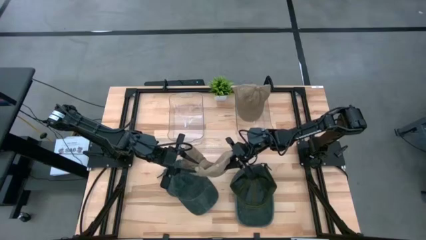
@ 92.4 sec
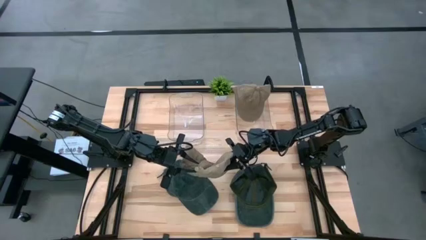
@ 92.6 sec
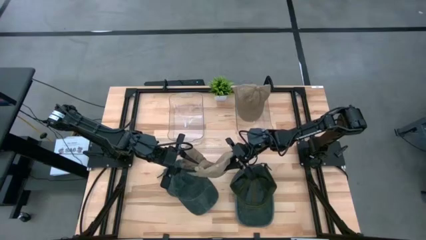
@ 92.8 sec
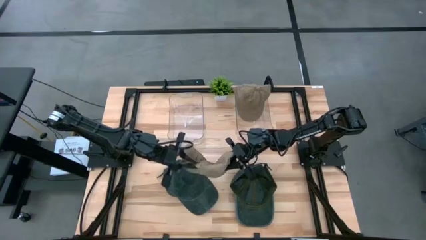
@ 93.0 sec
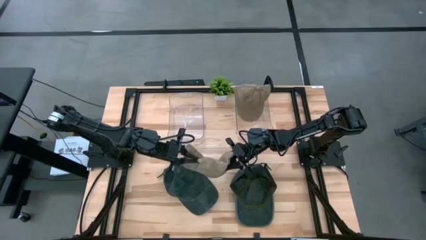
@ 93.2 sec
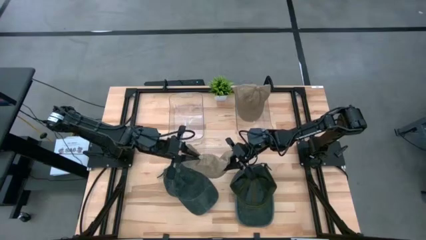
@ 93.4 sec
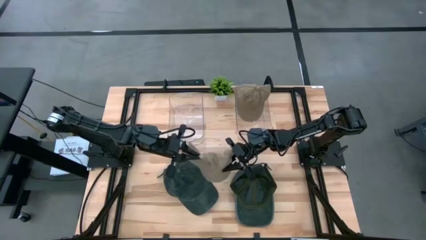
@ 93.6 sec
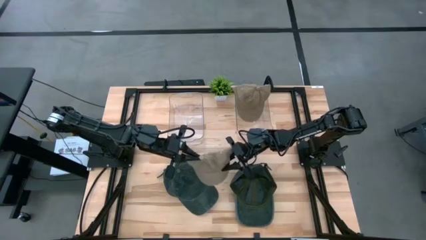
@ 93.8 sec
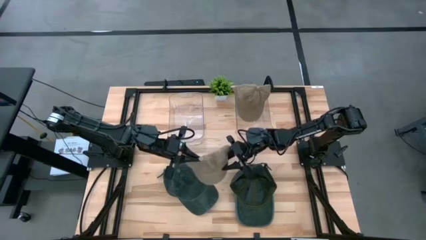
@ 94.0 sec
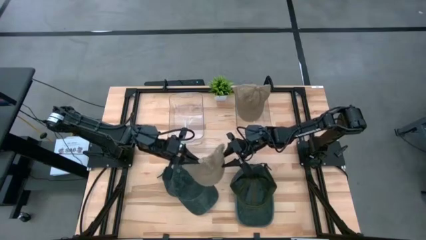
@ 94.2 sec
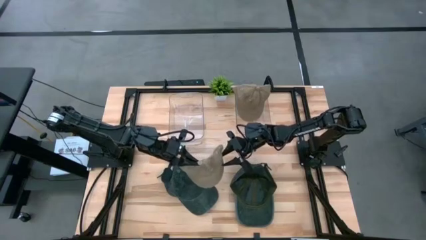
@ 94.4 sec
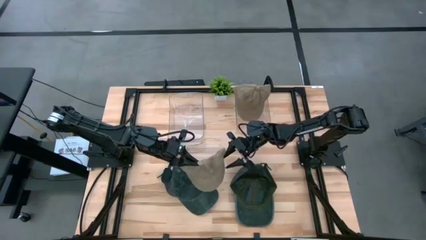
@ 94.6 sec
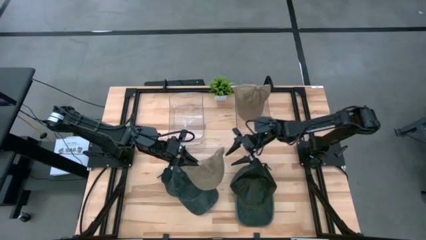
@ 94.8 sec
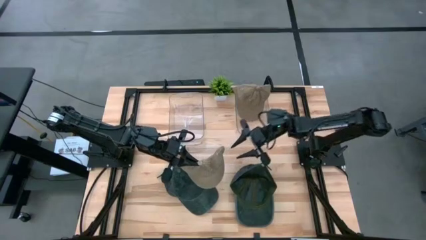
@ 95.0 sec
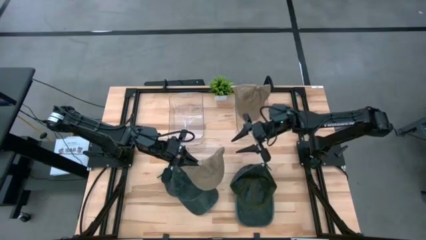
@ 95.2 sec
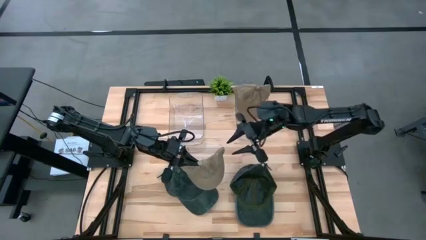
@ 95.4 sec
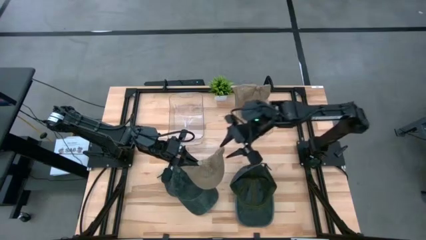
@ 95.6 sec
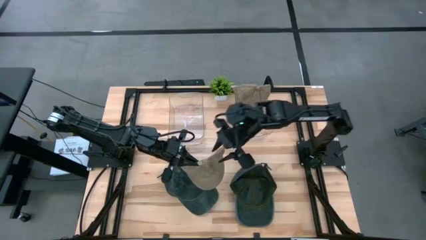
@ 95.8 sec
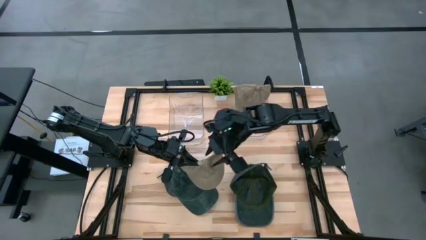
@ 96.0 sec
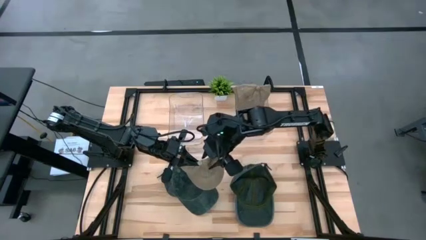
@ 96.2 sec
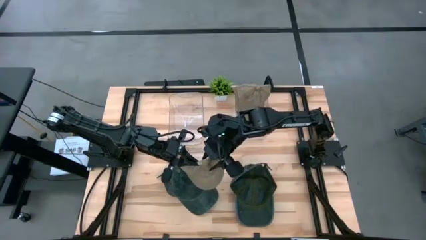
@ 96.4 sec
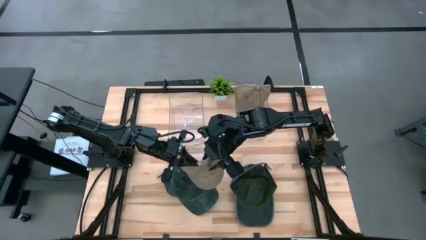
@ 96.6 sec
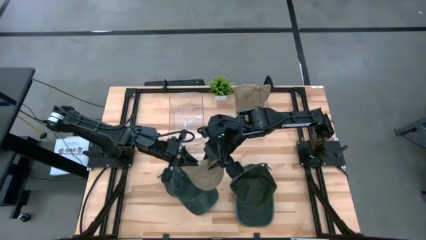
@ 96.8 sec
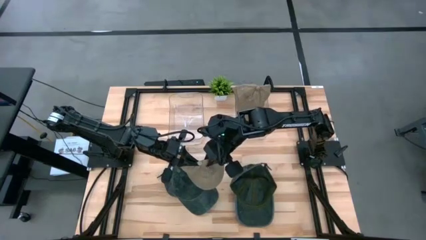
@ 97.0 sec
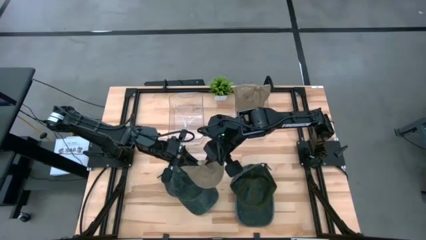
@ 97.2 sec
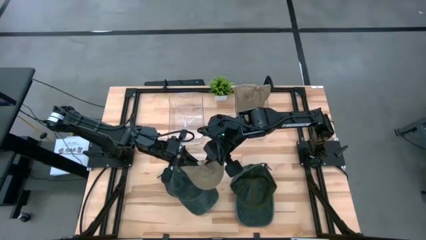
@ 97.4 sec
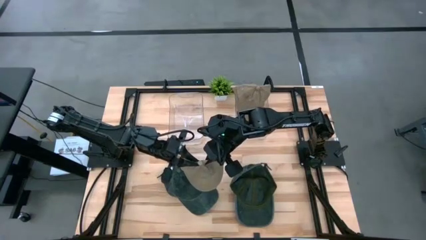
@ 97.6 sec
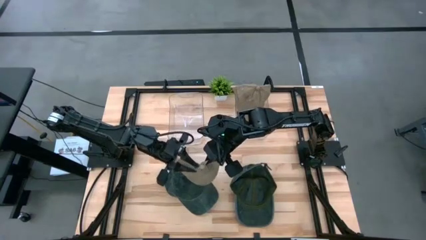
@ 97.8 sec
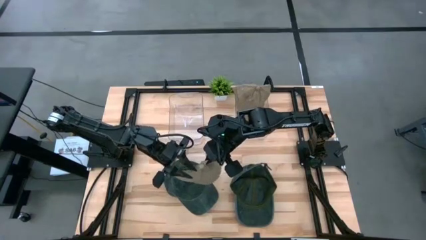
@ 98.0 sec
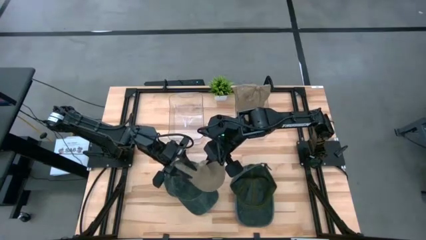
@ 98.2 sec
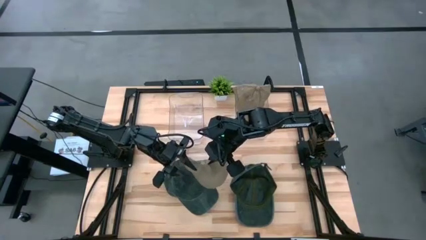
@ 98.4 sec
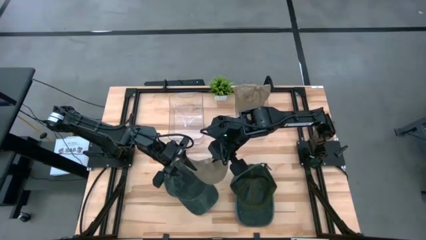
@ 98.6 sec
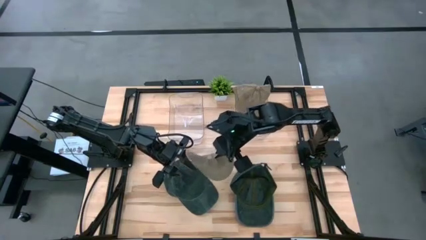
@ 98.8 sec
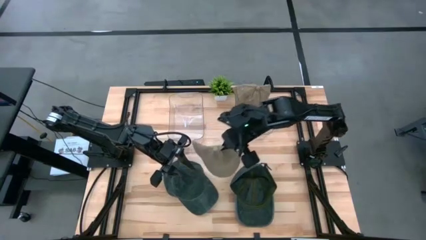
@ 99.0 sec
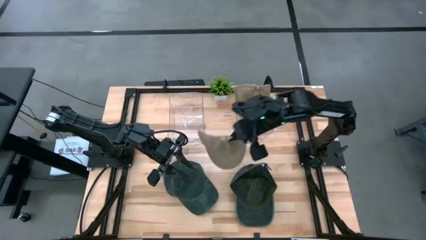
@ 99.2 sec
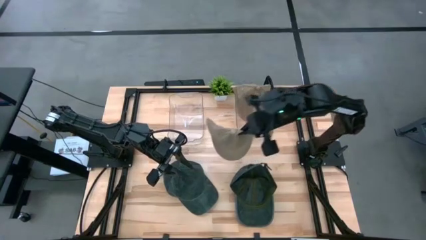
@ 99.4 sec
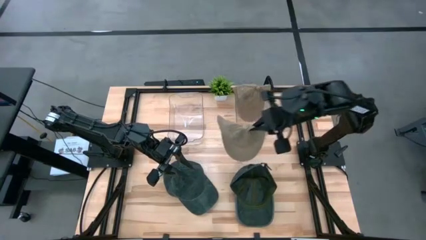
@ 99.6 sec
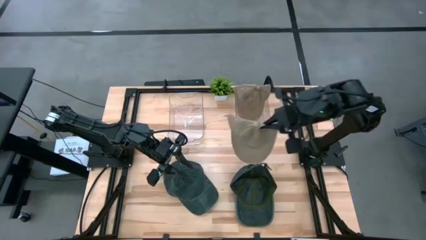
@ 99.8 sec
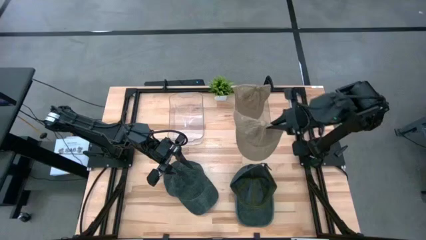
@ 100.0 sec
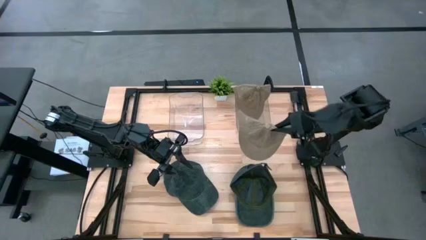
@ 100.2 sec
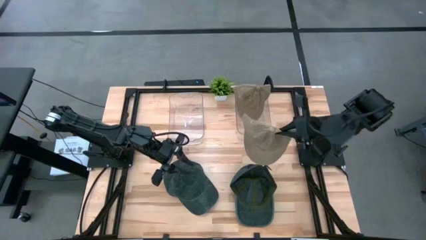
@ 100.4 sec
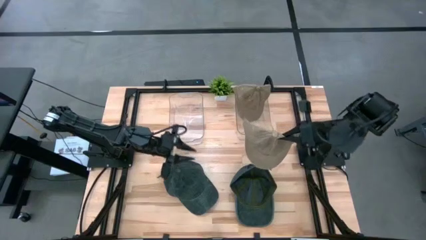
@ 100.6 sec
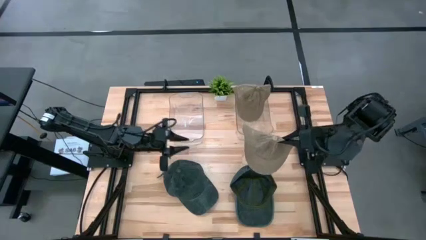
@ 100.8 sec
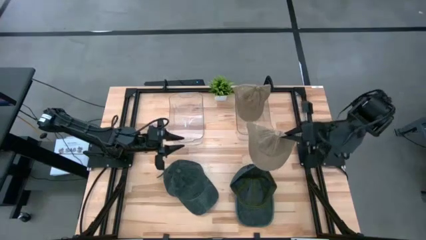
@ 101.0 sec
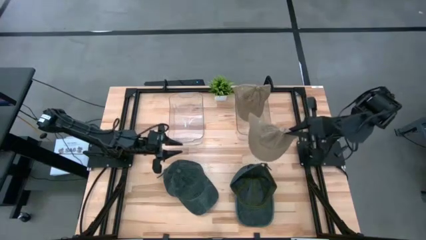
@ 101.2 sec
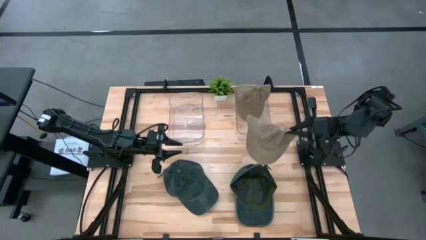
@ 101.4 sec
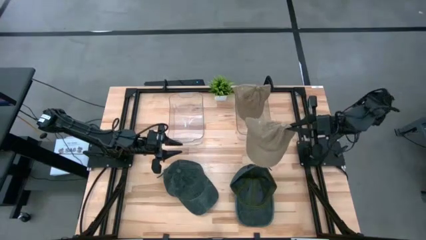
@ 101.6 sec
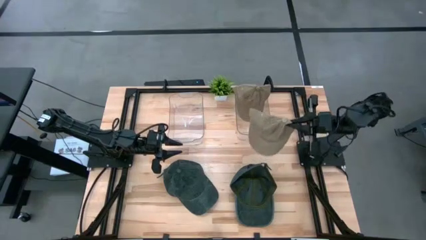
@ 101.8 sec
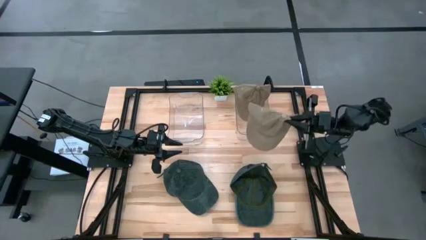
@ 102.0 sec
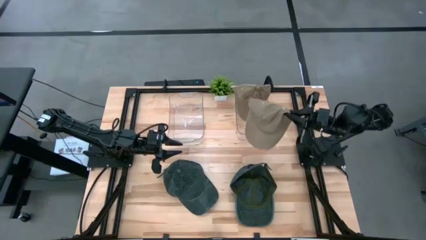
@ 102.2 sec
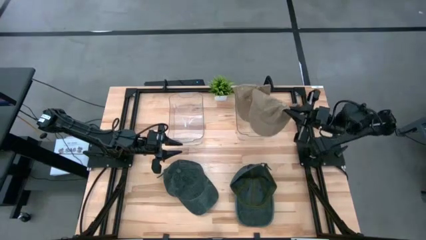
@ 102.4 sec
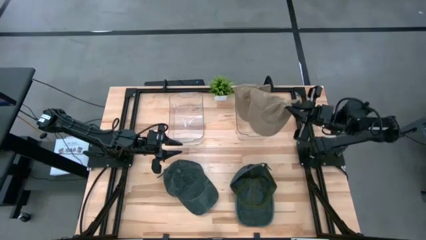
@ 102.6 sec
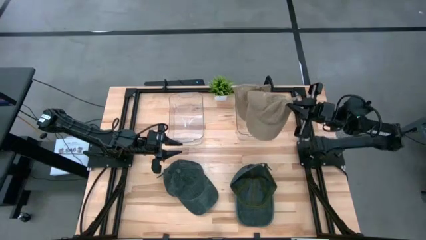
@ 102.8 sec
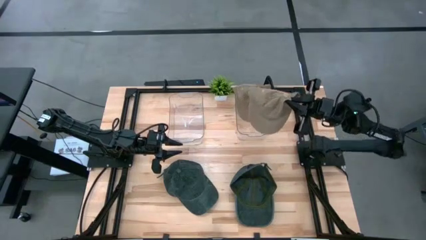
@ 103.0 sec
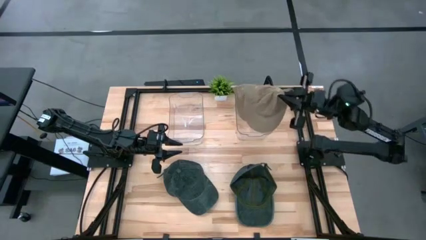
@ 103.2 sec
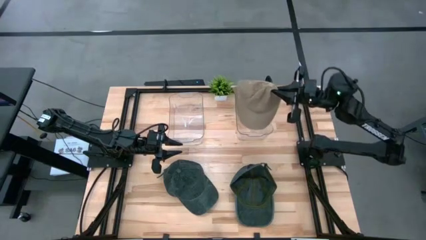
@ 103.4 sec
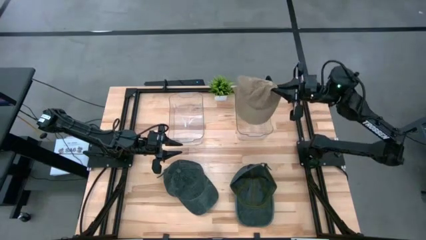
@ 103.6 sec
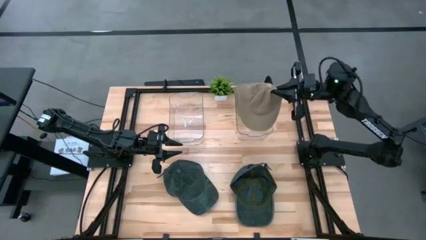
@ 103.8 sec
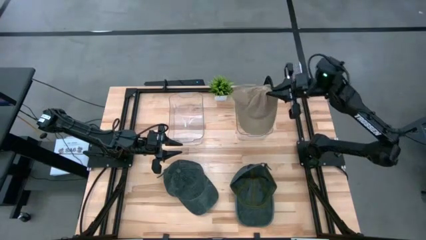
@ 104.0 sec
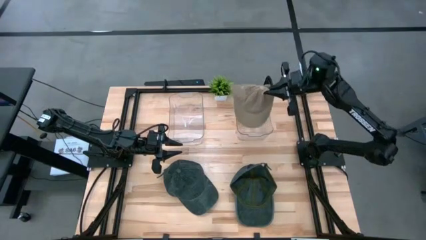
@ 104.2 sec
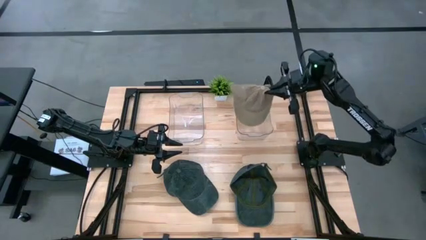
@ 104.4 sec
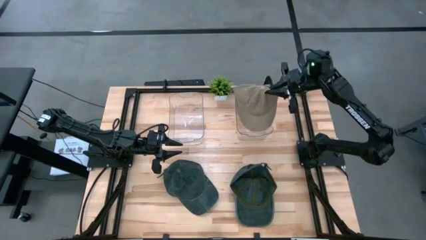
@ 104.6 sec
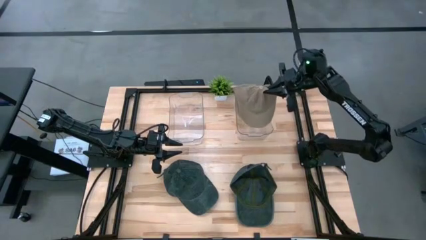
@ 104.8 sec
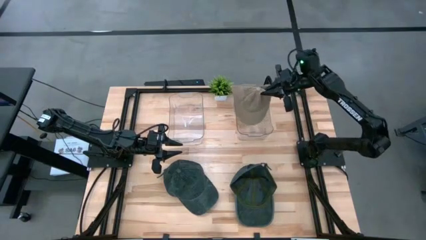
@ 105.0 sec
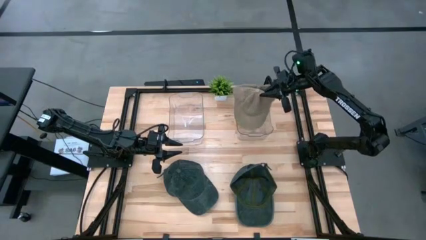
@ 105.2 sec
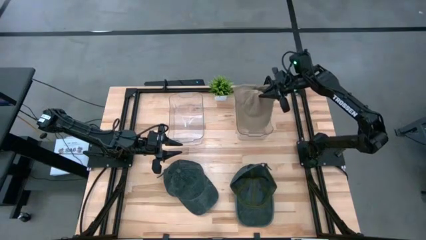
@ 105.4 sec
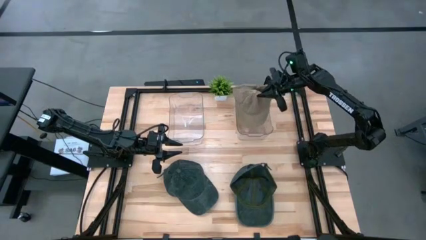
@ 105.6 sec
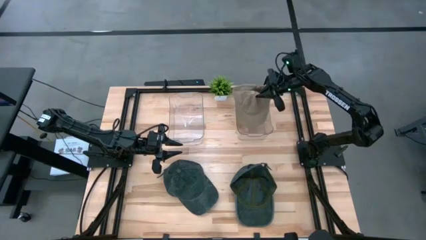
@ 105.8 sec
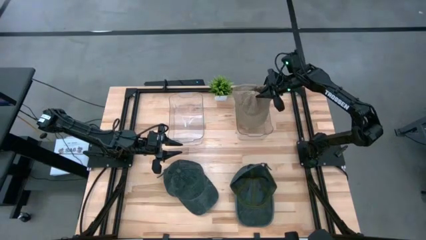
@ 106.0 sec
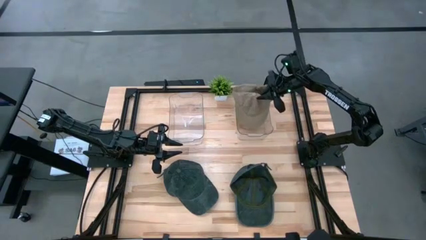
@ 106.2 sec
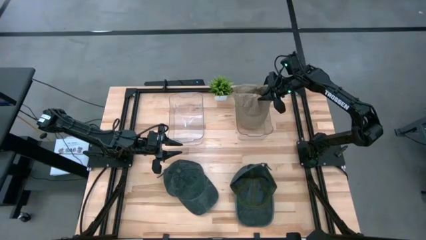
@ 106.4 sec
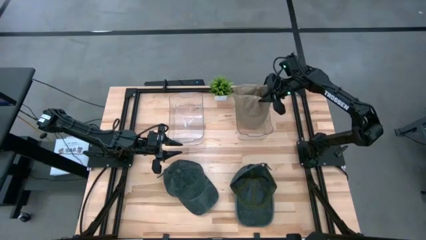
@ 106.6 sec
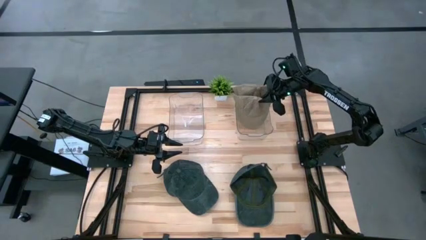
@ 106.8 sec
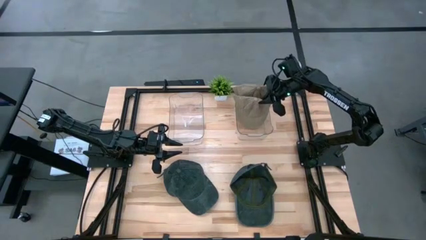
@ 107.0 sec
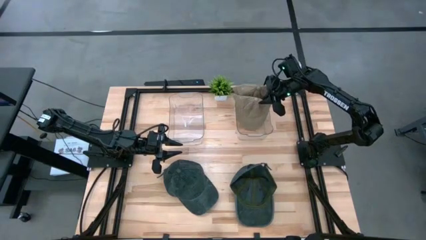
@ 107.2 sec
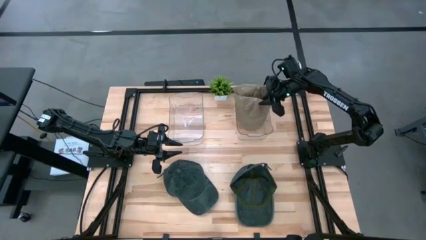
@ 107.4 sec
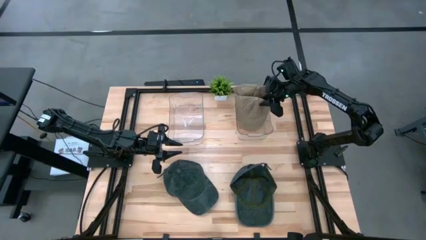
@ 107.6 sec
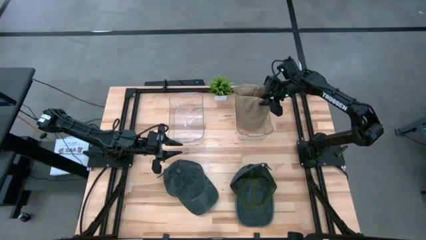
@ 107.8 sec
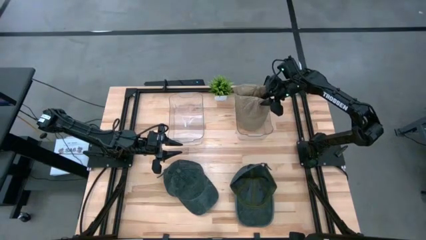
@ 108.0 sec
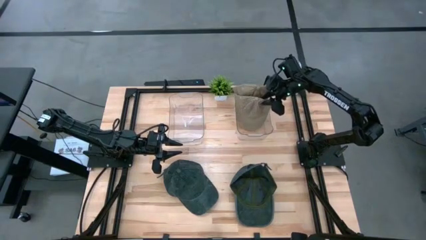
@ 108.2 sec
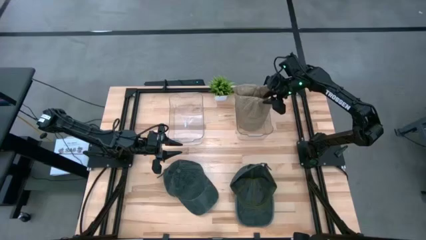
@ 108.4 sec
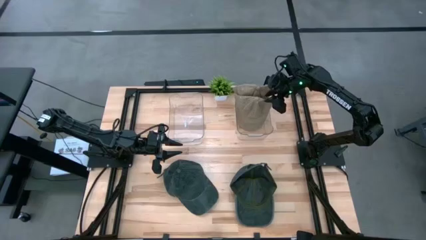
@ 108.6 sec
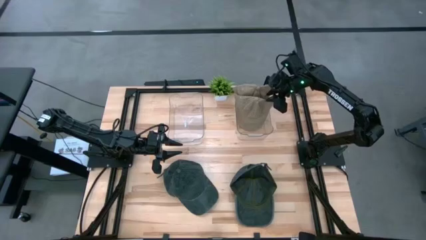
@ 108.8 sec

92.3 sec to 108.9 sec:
Task: Pick & Place hat
Put the brown cap into the right transparent bin
